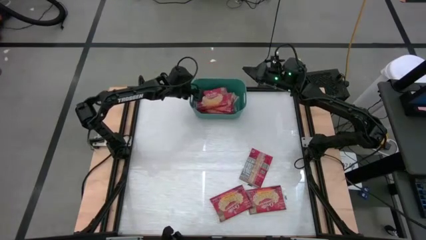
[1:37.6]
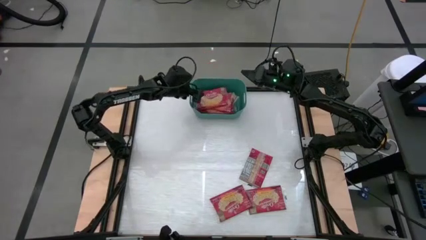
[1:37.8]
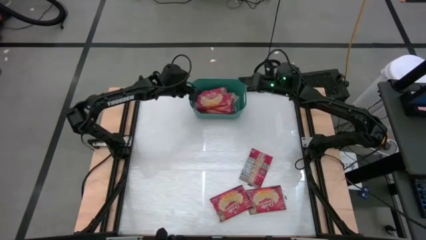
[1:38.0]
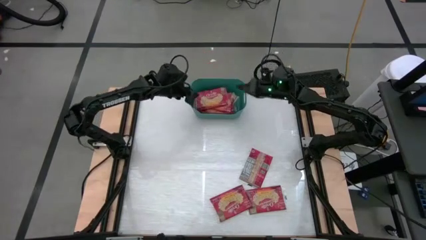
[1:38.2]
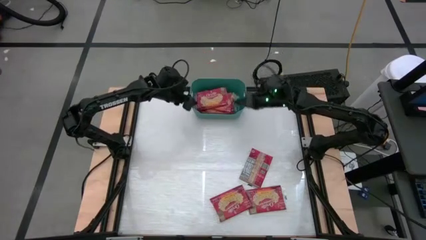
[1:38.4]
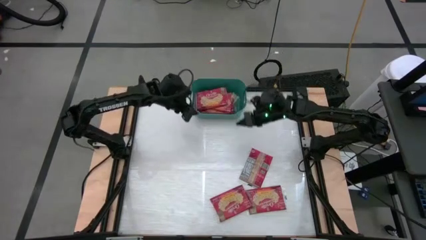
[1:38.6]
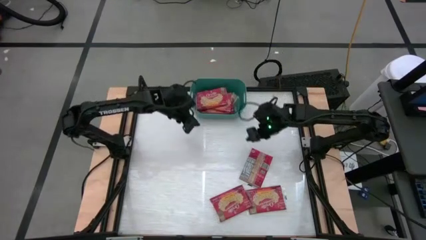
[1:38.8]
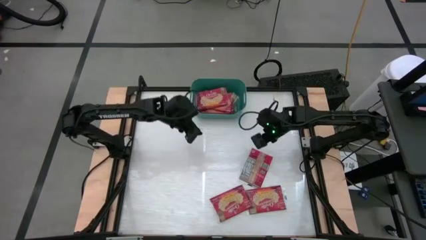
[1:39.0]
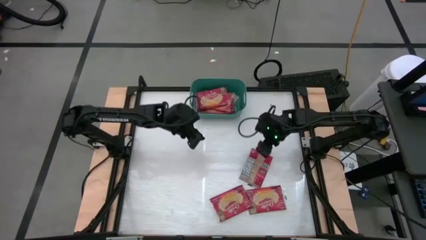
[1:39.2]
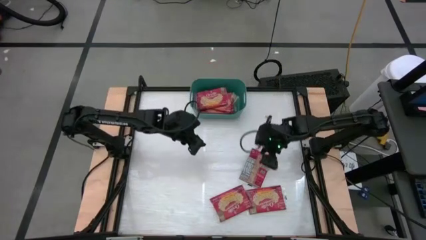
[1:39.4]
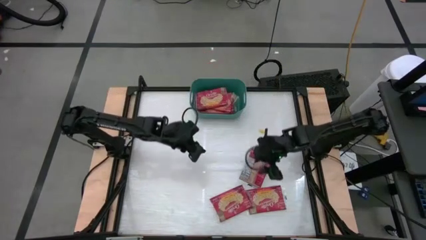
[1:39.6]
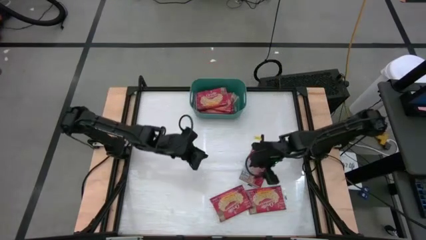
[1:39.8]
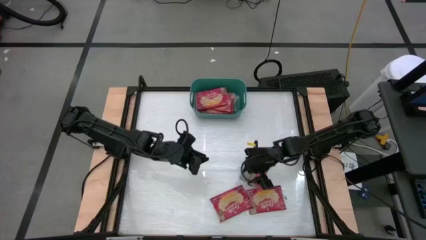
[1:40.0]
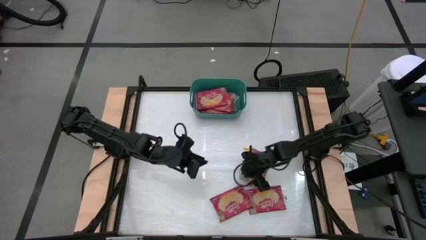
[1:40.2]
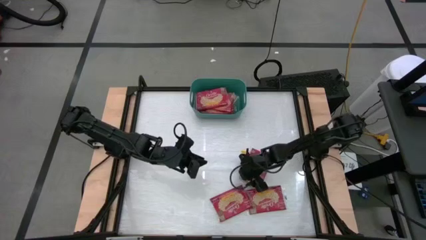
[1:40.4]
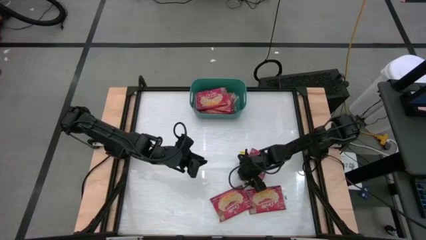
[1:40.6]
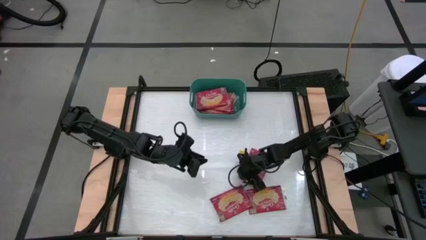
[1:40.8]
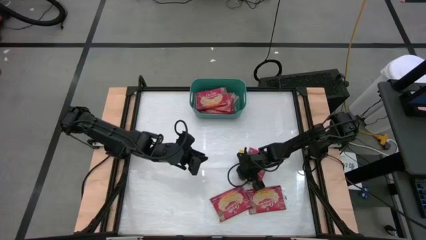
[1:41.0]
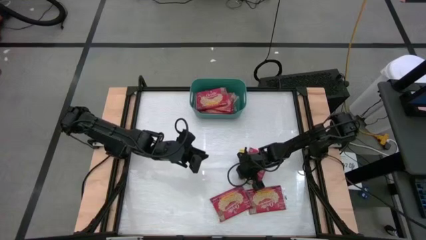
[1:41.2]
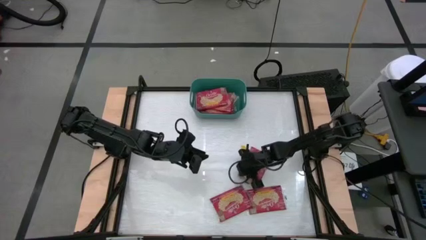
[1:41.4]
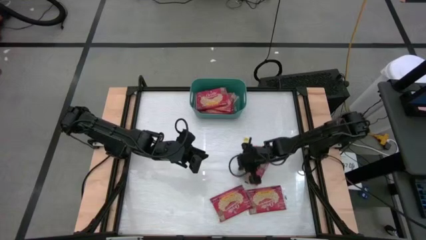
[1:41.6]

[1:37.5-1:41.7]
Task: Sort popcorn bags into baskets
Put the red popcorn pack into the green bin

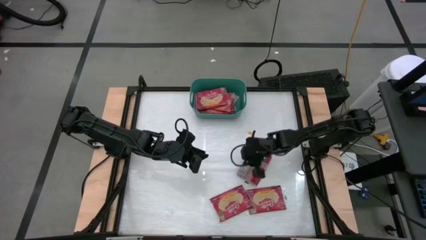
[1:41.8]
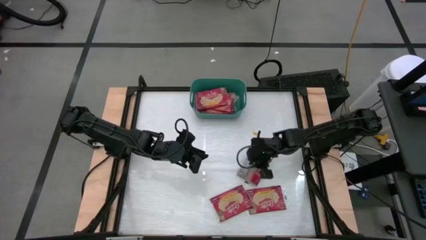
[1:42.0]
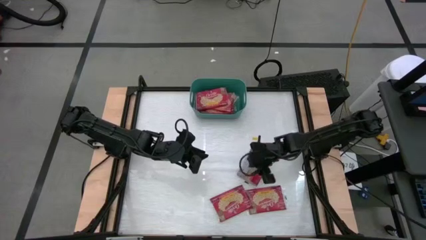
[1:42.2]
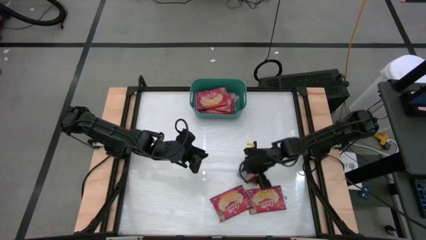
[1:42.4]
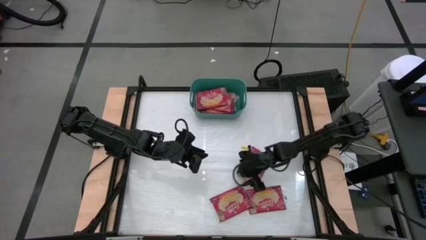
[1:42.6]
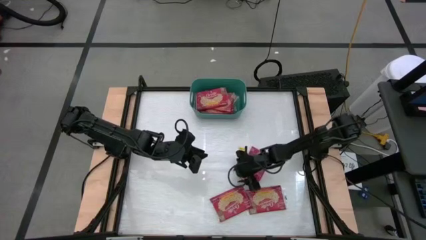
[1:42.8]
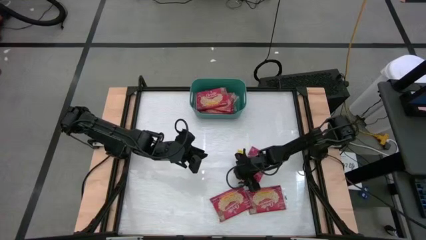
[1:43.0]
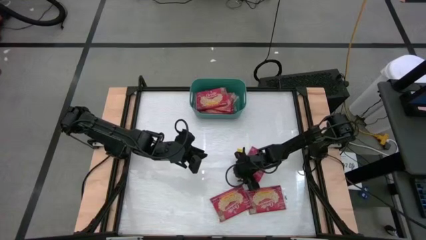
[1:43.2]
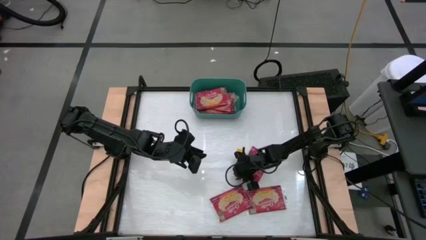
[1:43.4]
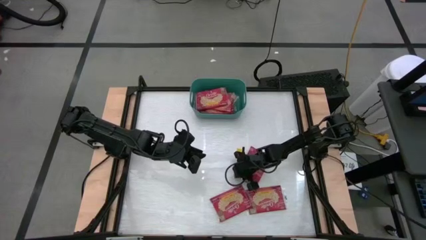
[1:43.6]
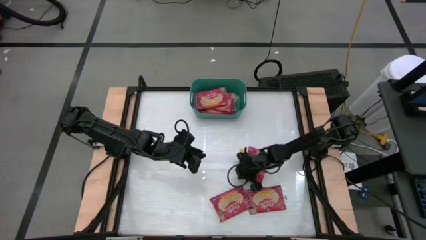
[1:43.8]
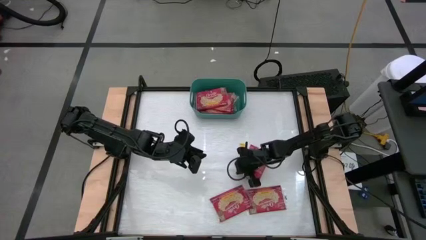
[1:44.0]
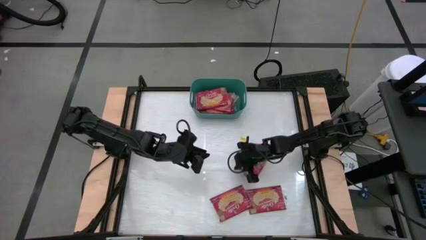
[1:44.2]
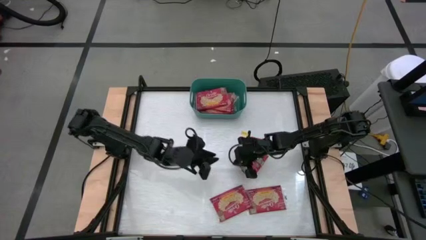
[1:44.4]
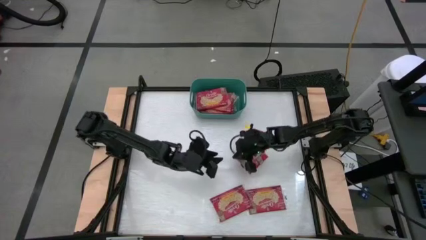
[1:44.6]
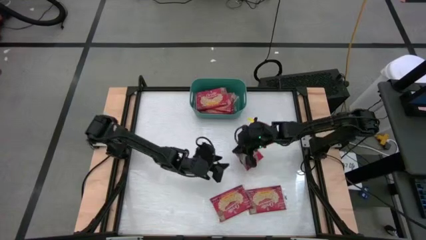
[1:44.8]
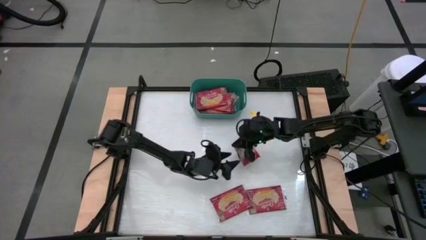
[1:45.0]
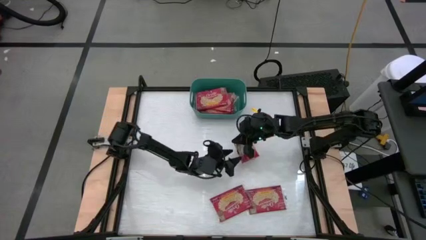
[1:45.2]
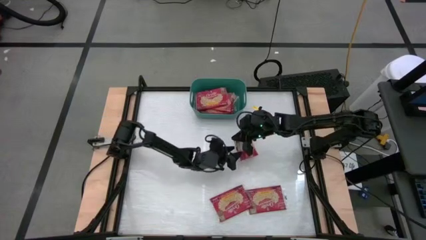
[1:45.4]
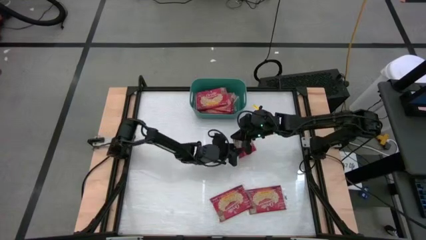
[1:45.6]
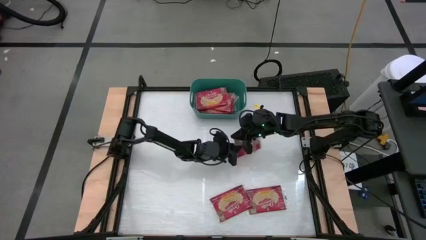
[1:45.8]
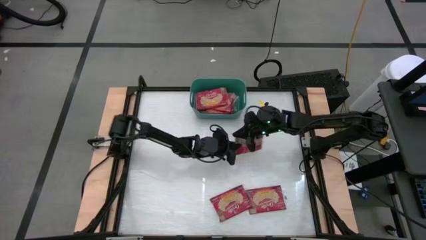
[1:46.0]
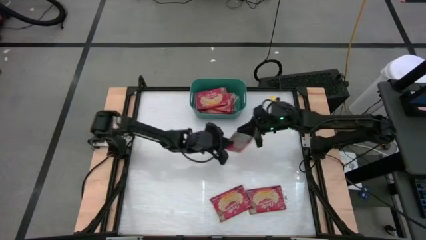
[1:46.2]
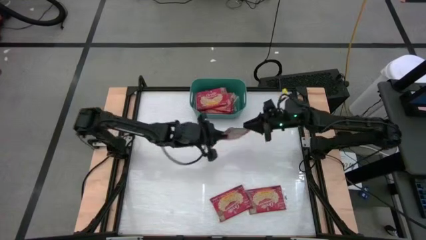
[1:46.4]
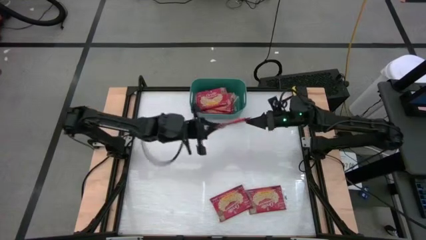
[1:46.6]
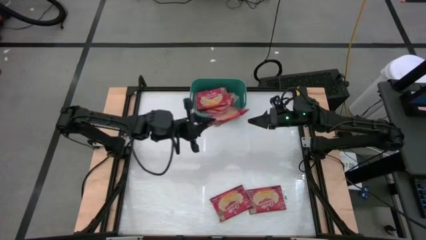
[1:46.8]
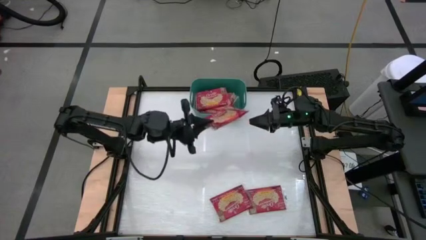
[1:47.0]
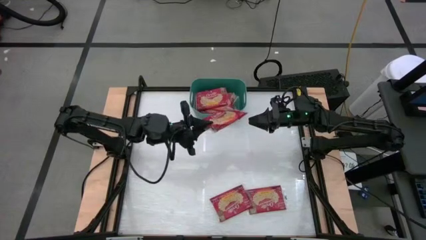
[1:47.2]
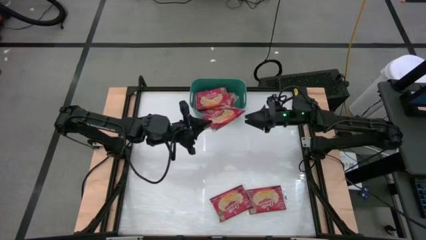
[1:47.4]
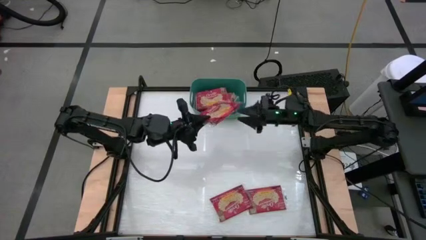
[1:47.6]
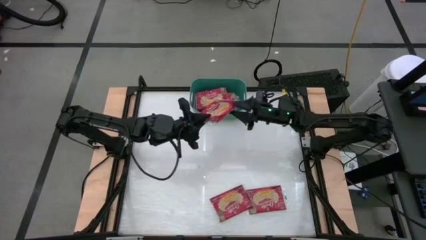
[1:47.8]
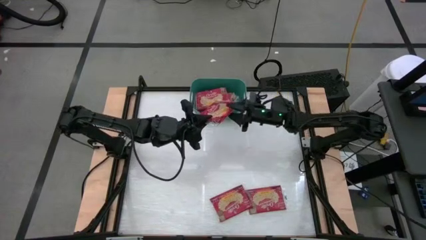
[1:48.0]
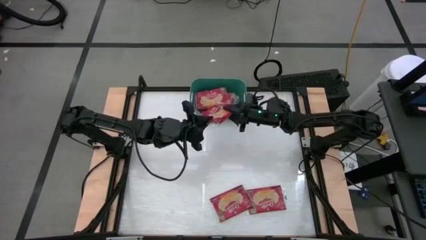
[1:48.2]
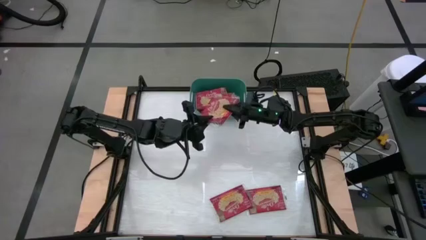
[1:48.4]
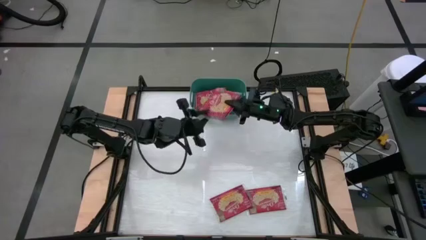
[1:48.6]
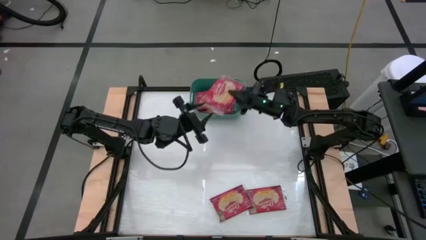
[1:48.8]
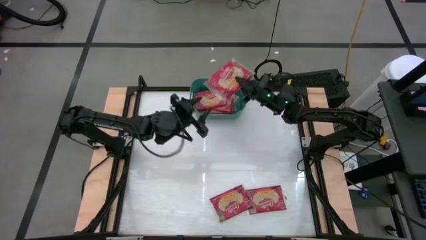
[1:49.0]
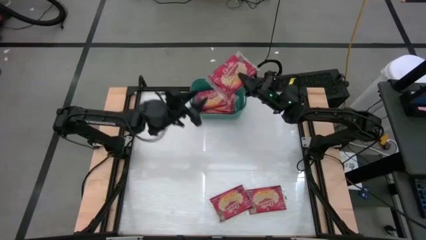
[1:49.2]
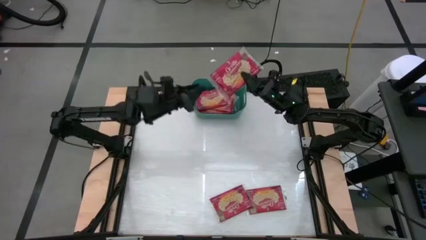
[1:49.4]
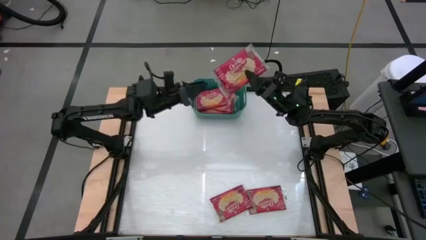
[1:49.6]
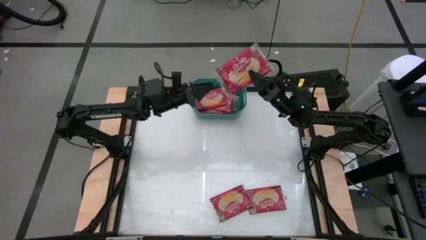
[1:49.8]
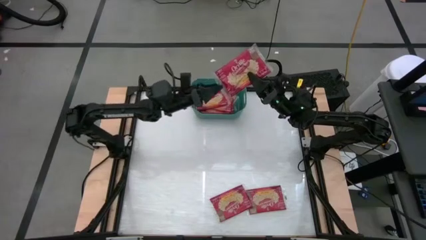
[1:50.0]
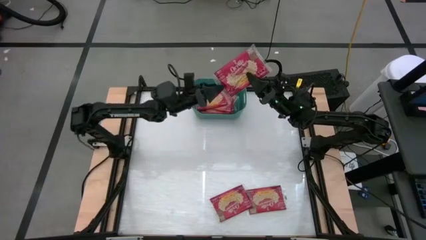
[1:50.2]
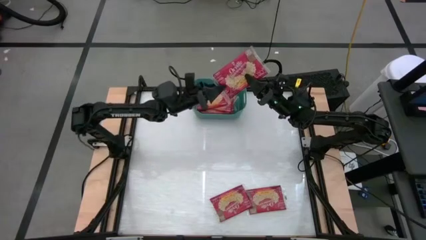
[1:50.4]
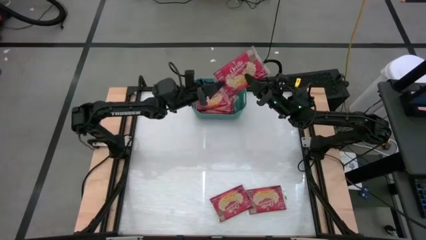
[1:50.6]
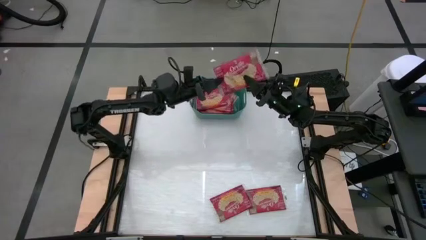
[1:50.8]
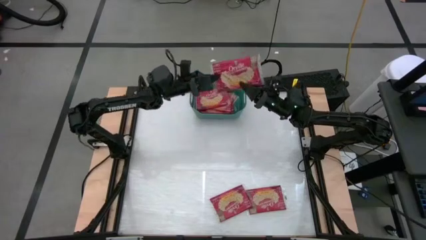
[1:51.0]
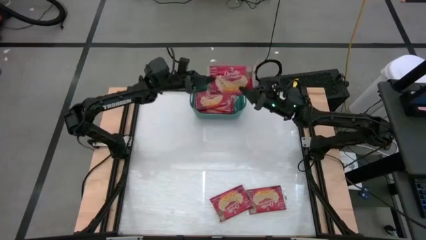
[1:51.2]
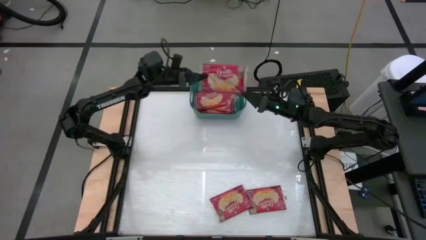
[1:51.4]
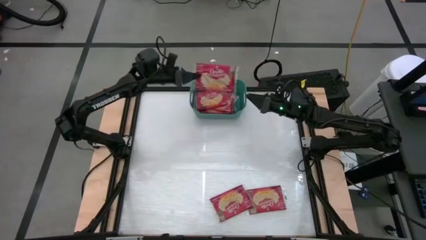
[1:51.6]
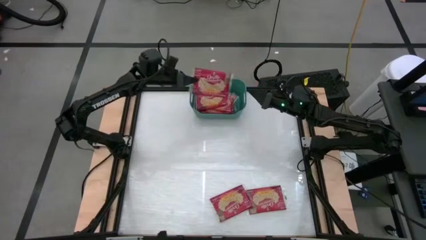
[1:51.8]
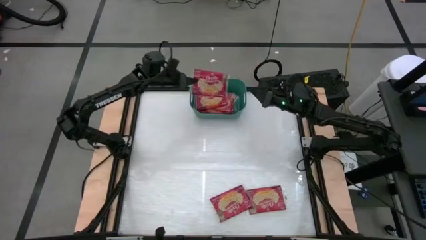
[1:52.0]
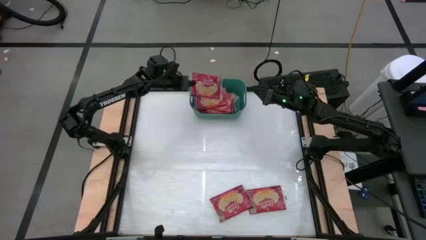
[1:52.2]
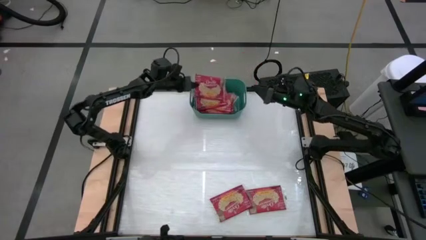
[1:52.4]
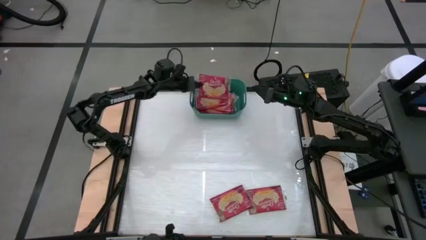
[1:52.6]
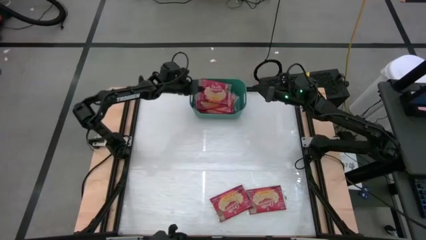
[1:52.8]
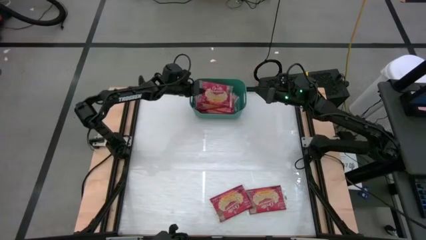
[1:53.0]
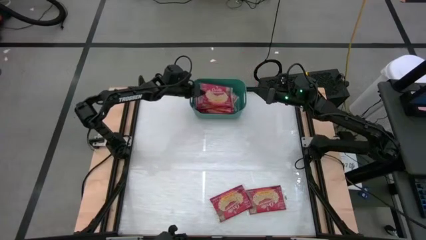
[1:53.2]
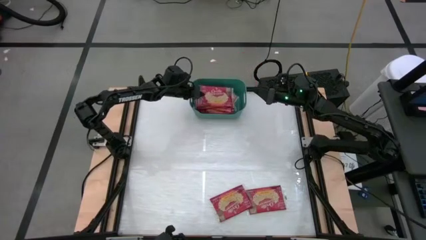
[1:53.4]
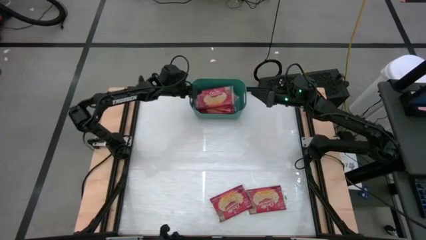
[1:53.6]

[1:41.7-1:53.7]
Put the red popcorn pack into the green bin
